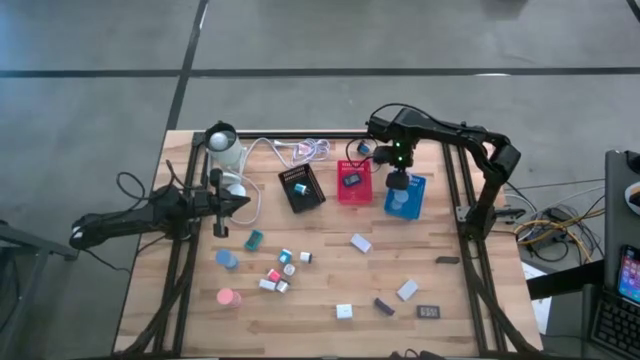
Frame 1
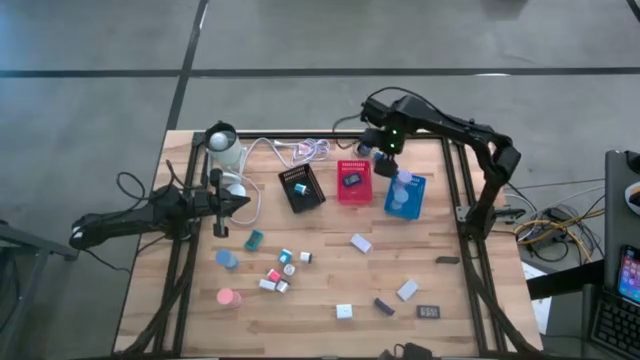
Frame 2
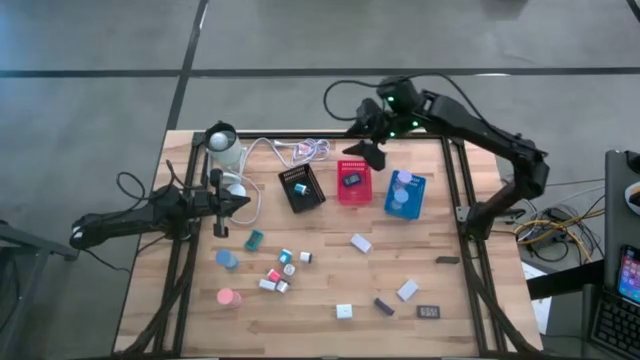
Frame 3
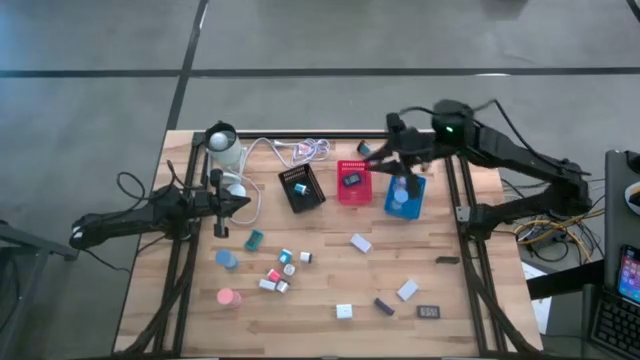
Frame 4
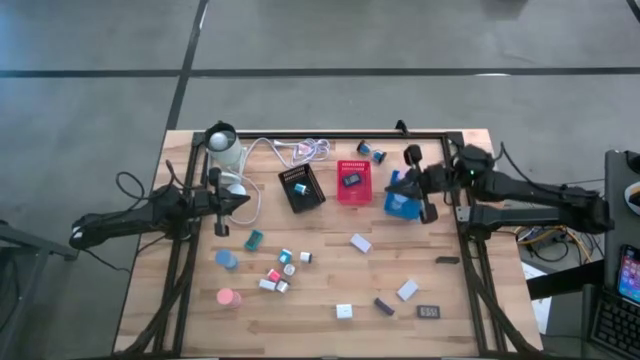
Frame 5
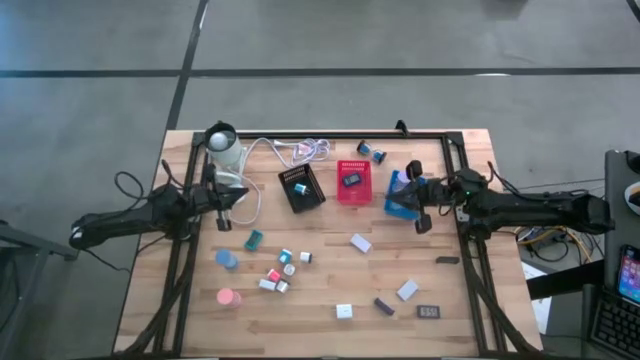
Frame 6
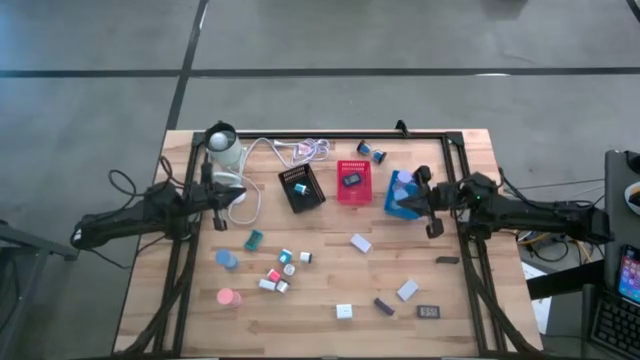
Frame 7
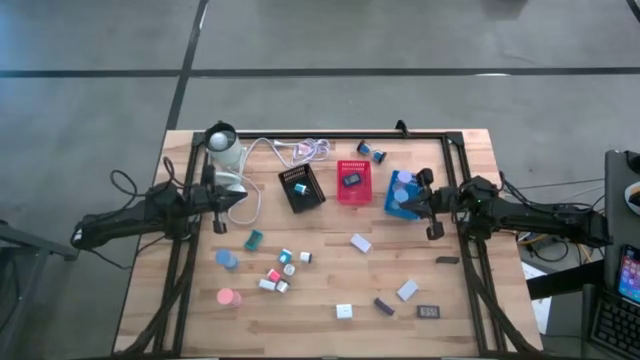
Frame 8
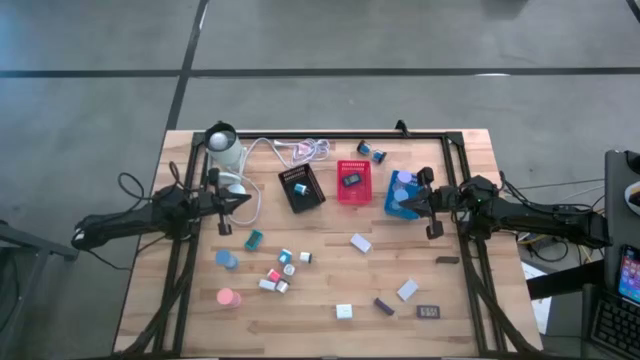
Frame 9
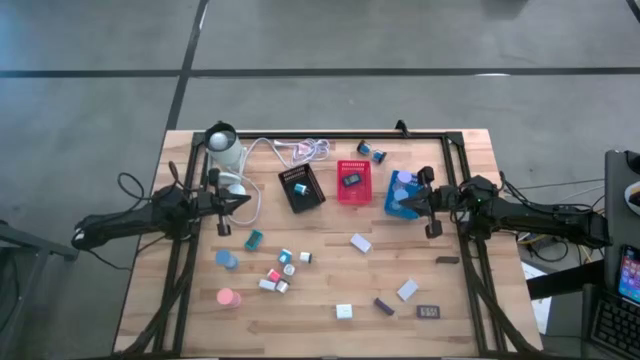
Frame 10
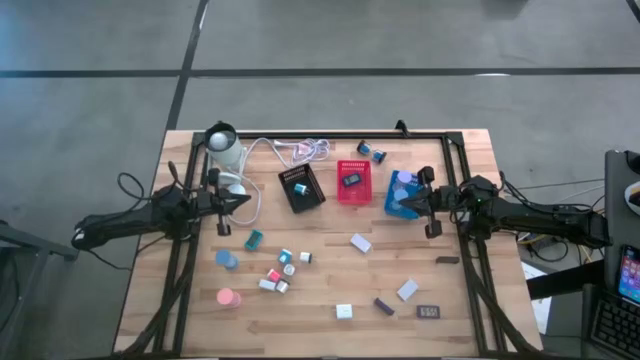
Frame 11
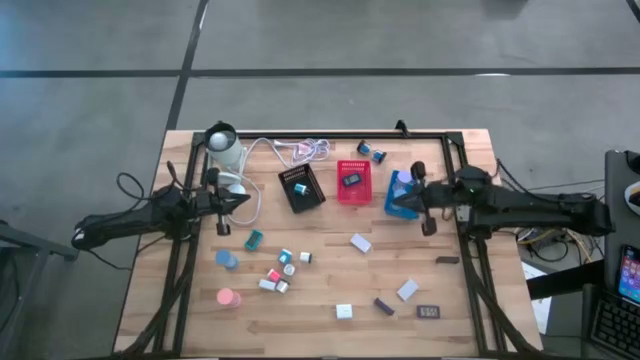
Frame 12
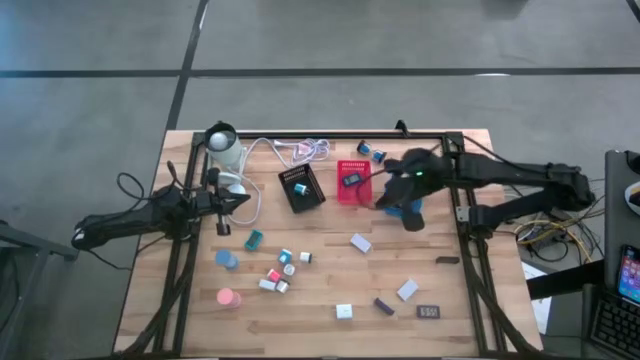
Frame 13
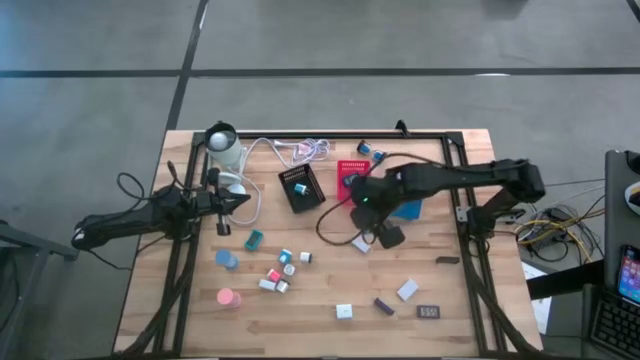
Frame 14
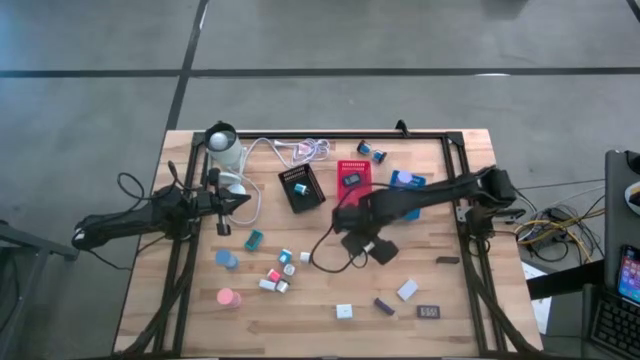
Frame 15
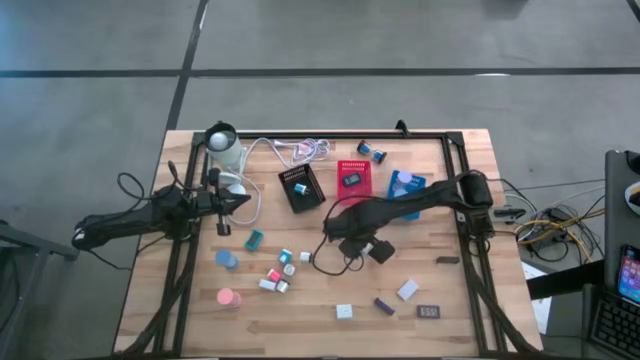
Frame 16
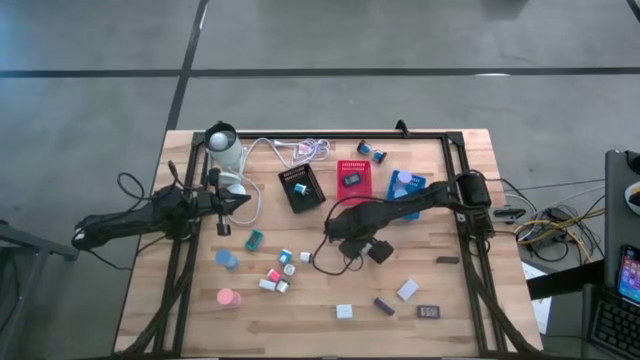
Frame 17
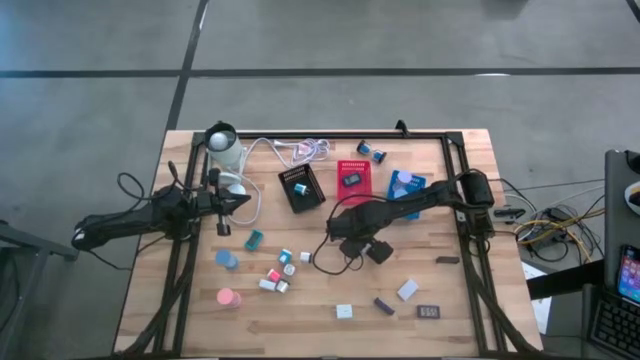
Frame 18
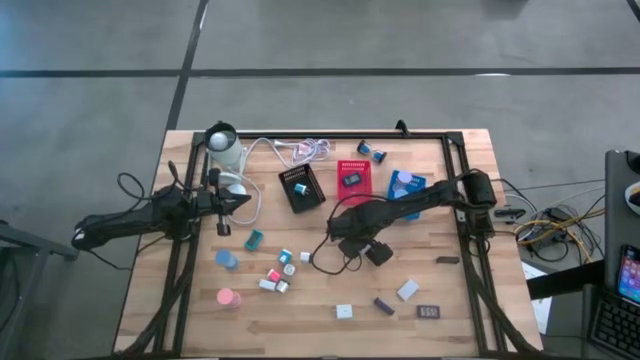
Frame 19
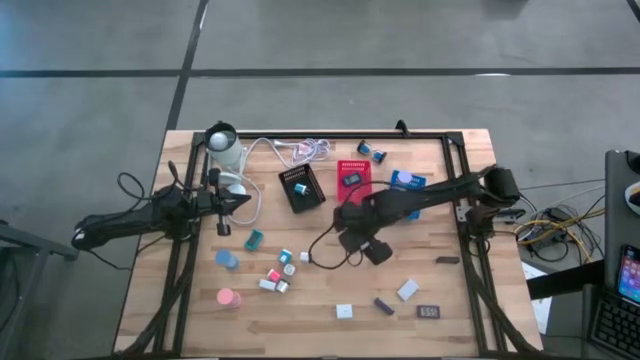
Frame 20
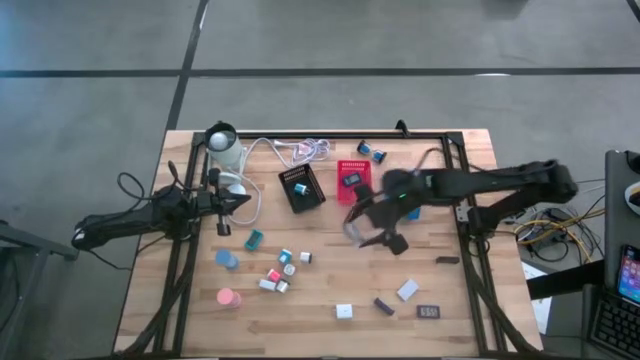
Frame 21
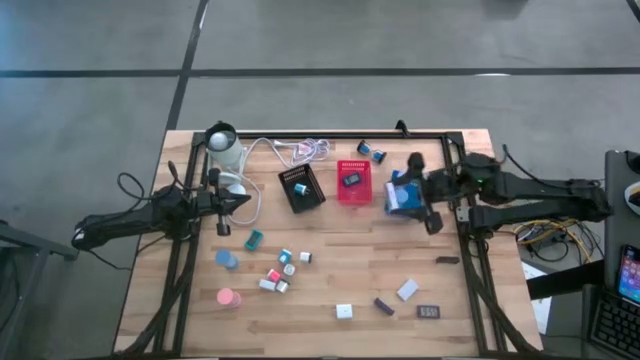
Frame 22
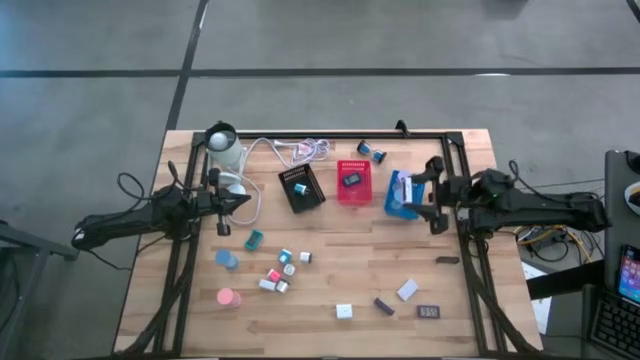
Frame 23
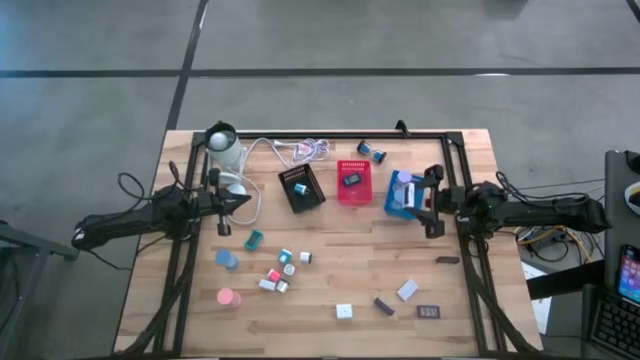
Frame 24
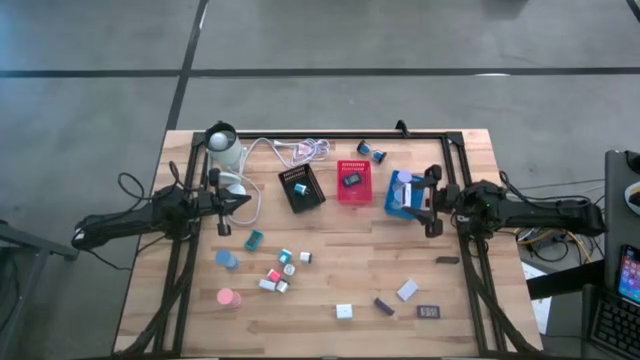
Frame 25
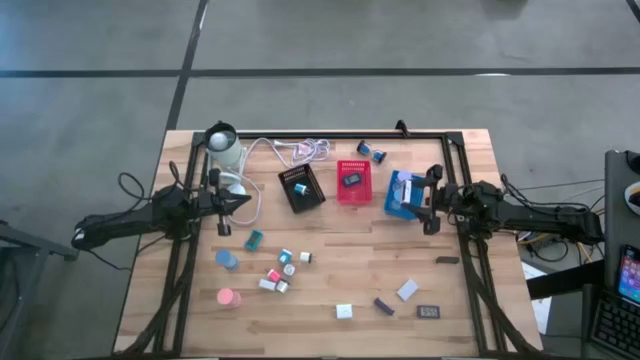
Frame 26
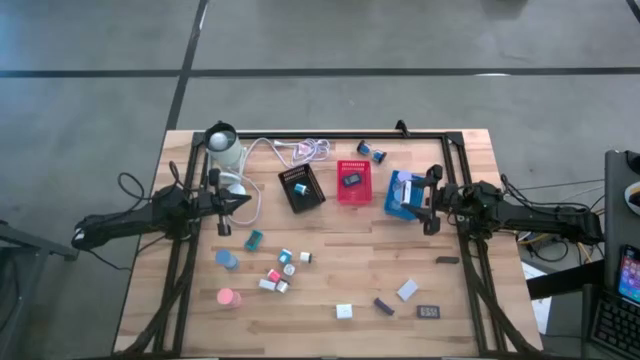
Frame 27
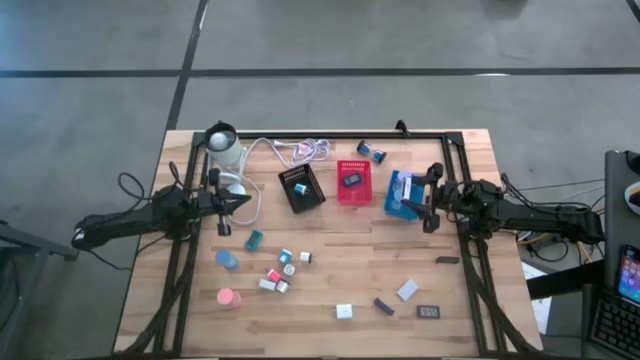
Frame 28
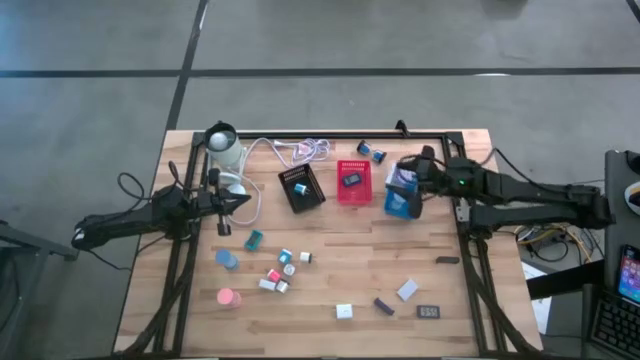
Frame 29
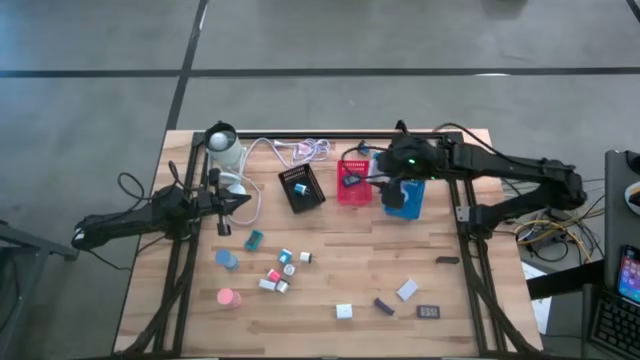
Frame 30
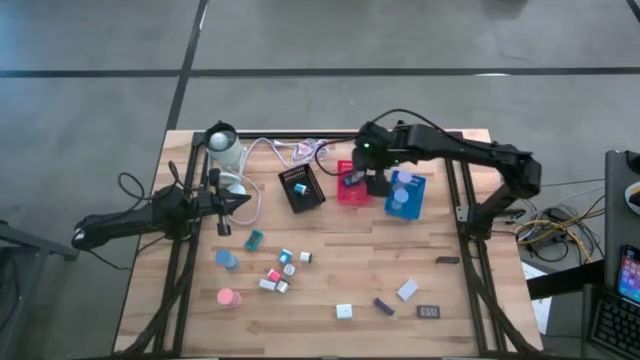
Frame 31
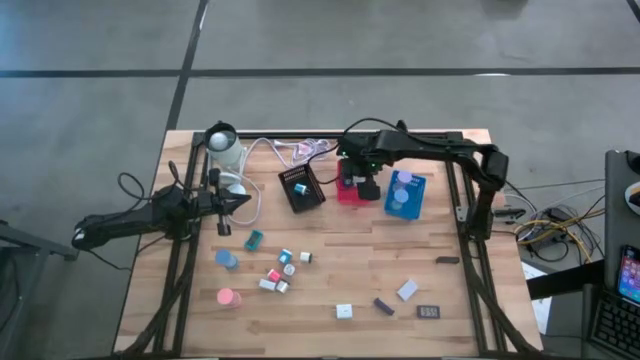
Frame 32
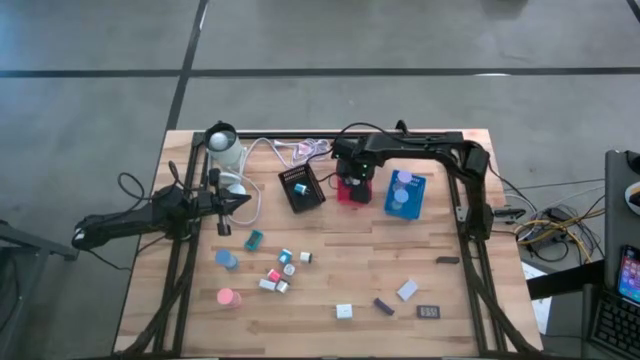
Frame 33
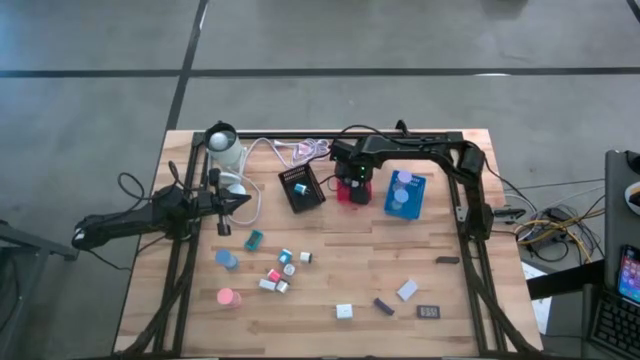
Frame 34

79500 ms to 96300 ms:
Task: Pick & Place Office items
Put the top white digital clock into the red bin

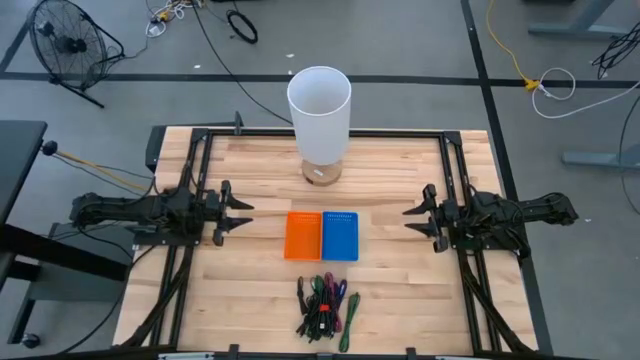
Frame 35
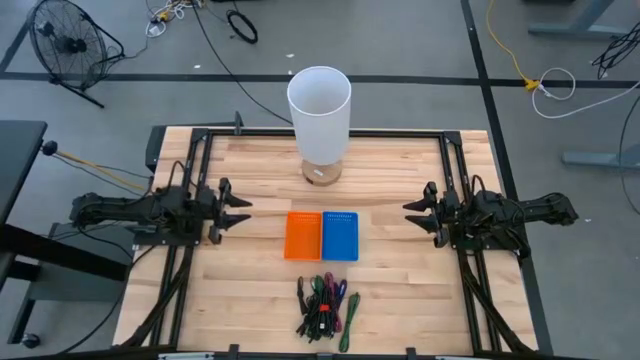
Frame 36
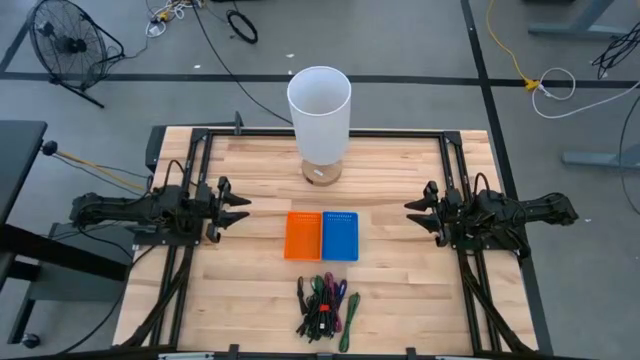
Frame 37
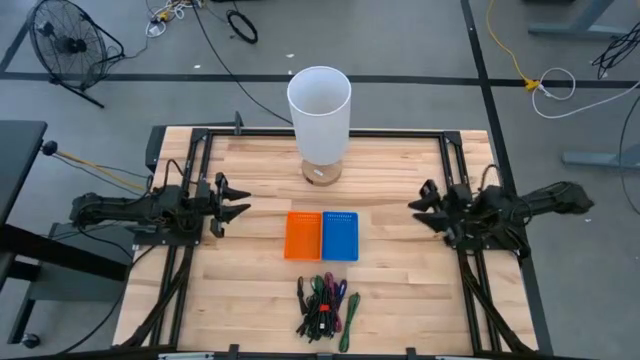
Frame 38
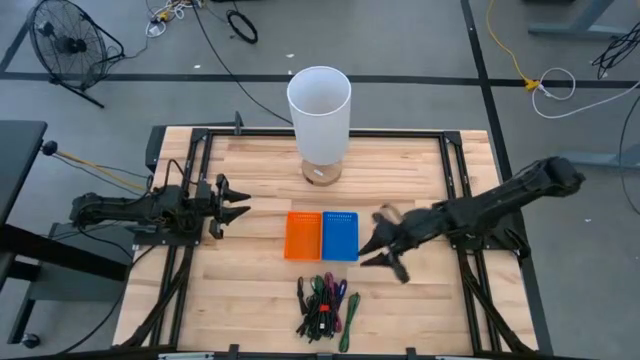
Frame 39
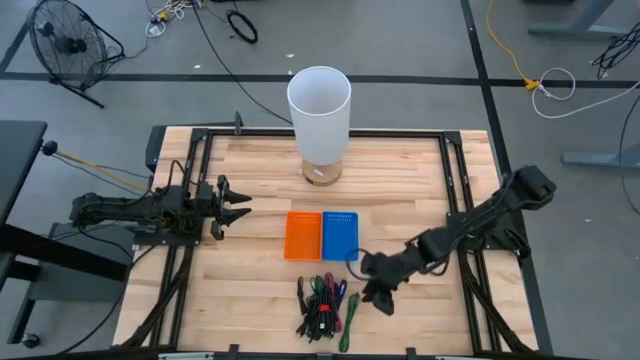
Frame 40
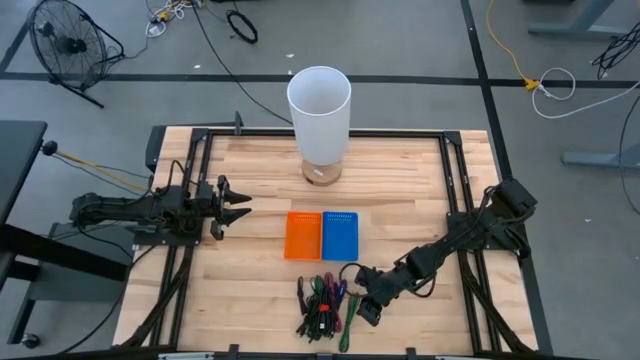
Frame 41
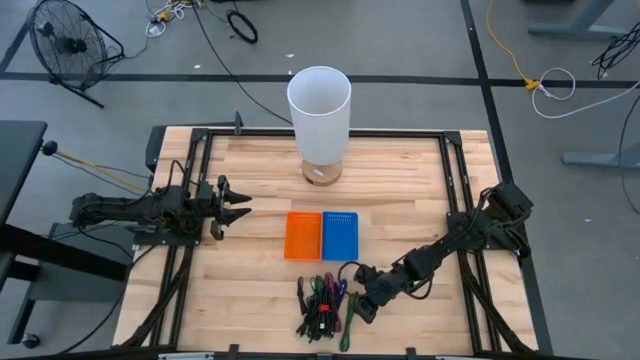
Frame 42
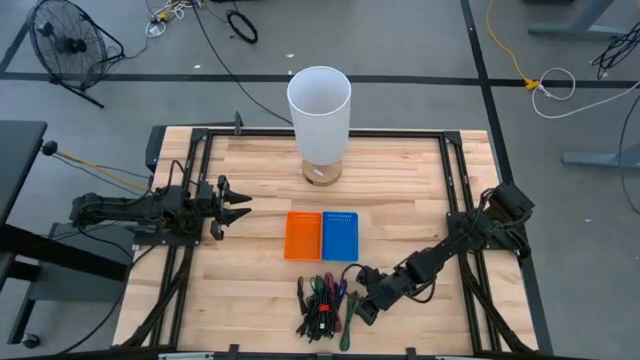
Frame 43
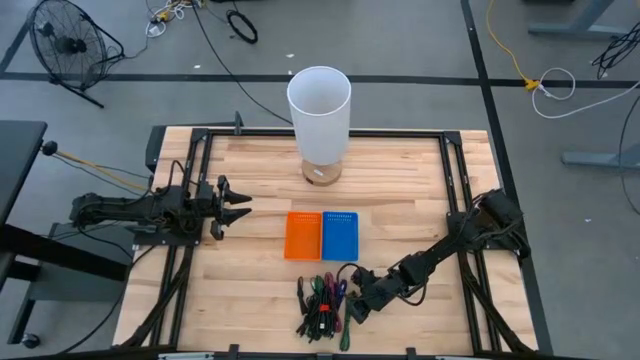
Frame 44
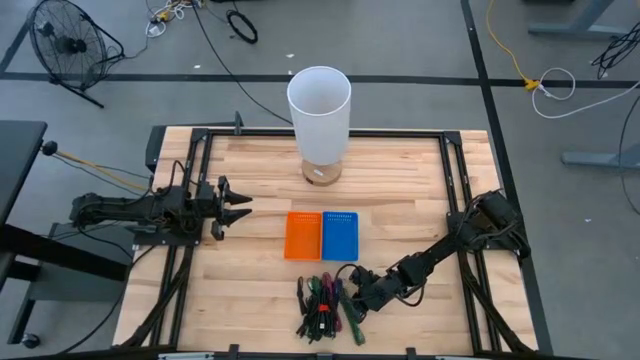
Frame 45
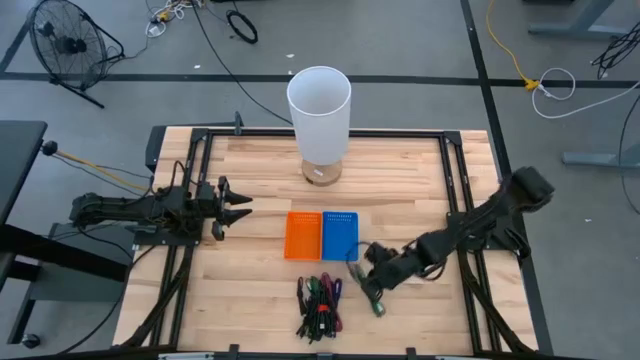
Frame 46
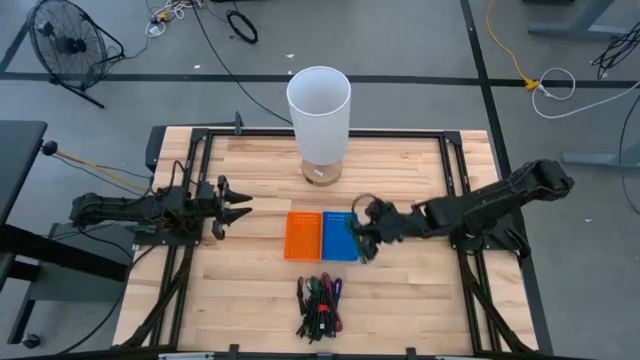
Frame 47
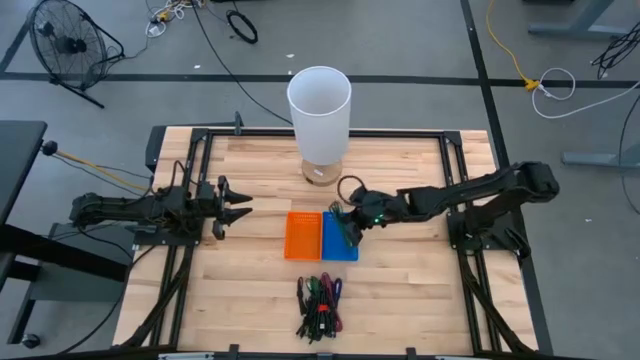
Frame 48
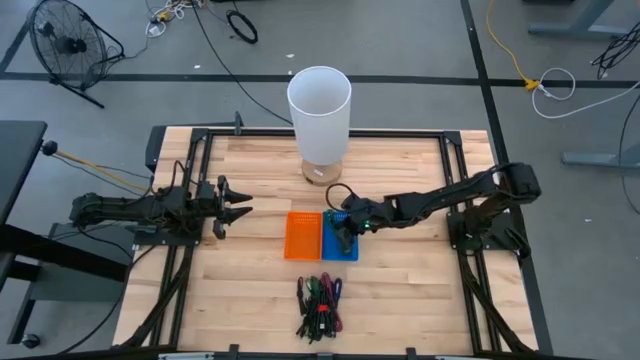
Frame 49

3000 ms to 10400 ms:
Task: Pick & Place USB Port
Put the green USB cable into the blue bin
